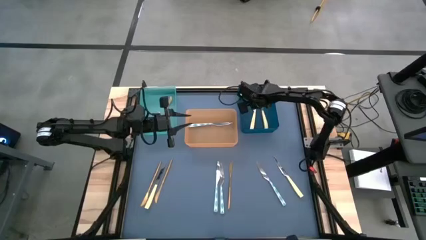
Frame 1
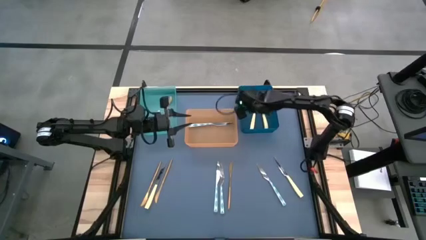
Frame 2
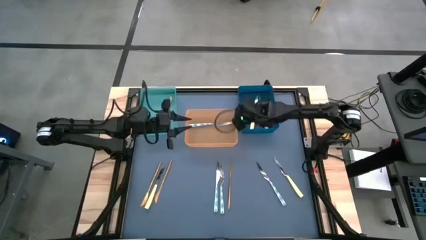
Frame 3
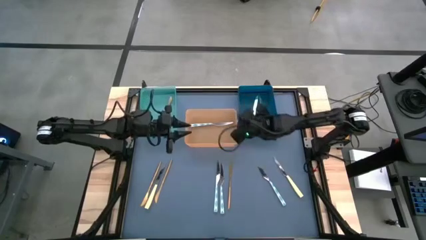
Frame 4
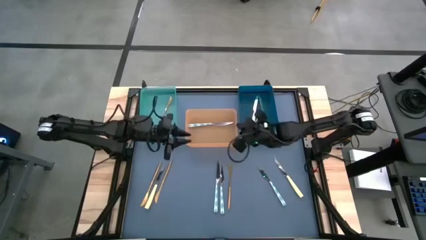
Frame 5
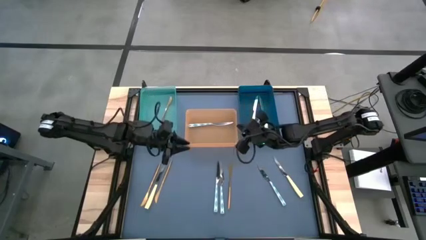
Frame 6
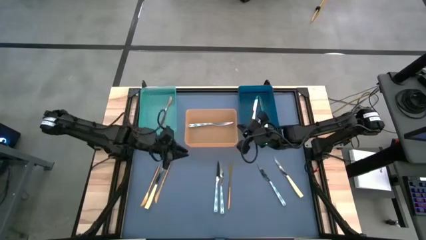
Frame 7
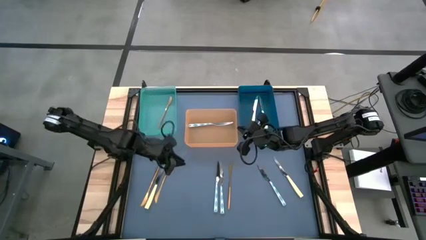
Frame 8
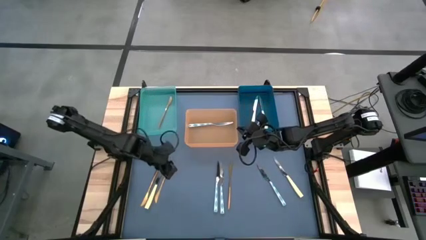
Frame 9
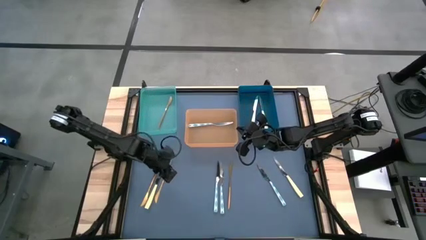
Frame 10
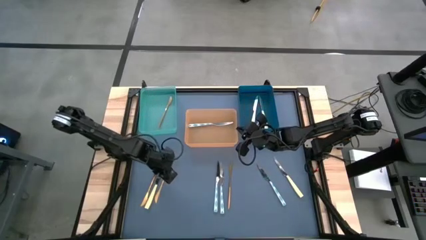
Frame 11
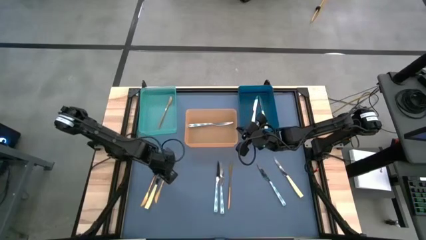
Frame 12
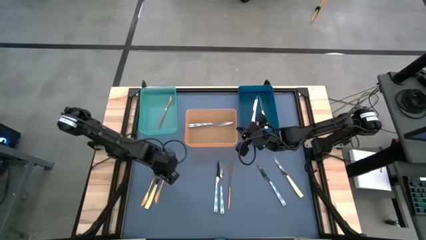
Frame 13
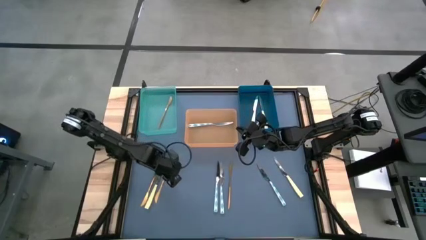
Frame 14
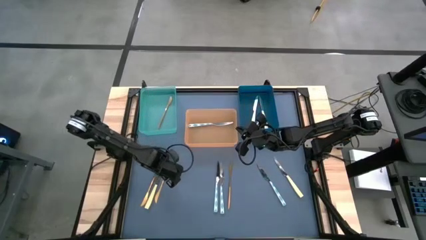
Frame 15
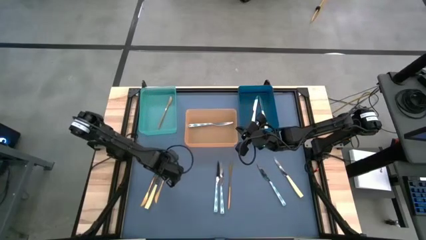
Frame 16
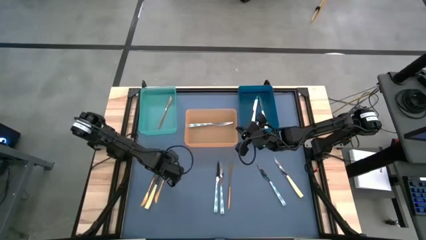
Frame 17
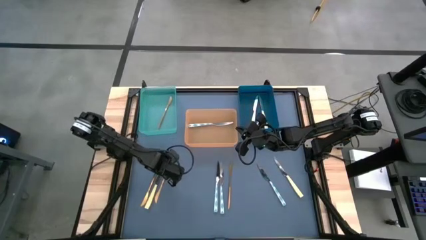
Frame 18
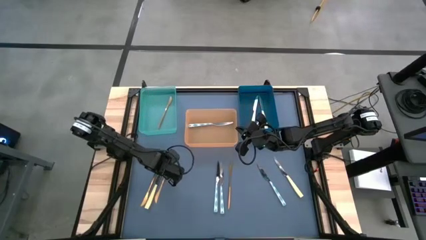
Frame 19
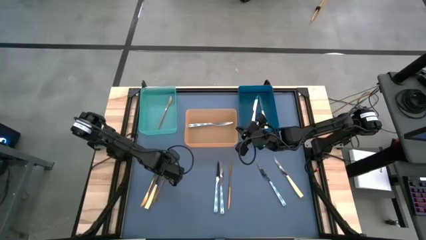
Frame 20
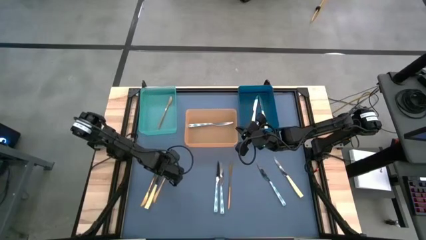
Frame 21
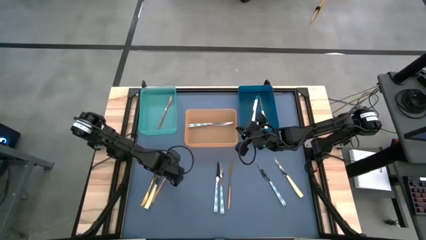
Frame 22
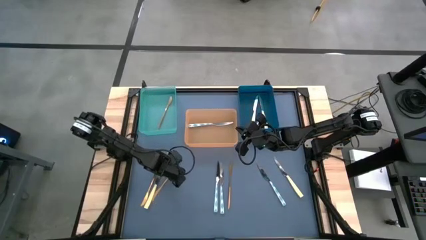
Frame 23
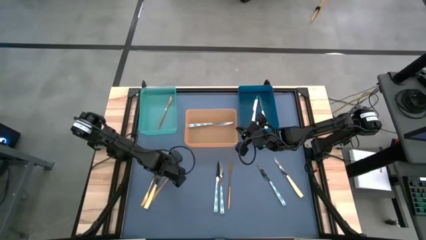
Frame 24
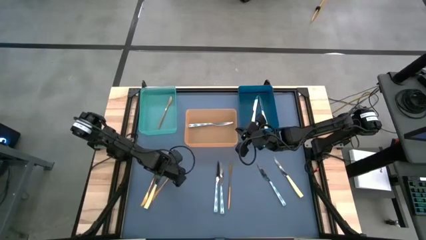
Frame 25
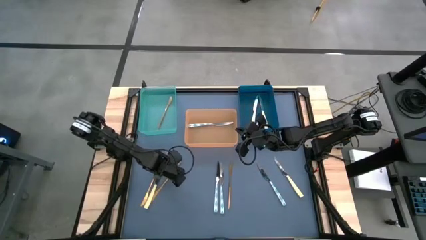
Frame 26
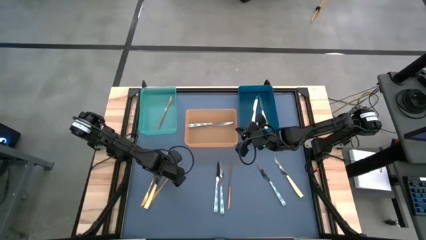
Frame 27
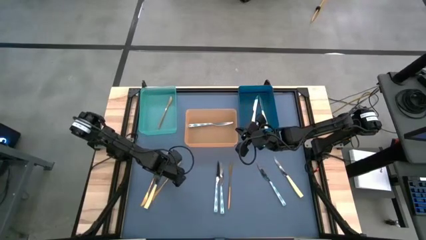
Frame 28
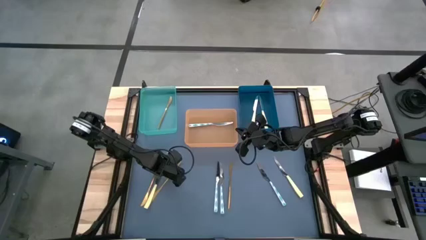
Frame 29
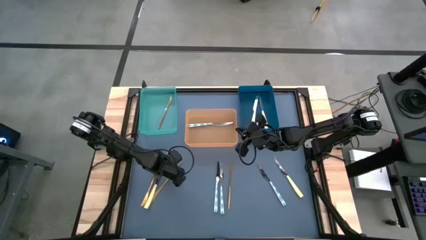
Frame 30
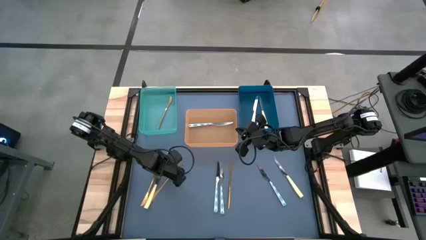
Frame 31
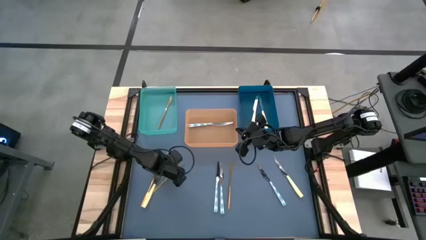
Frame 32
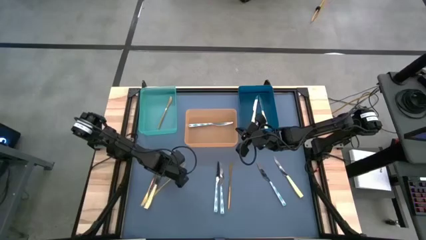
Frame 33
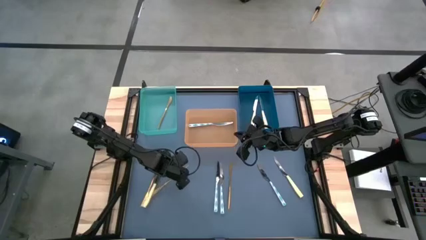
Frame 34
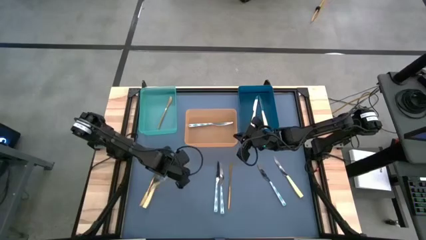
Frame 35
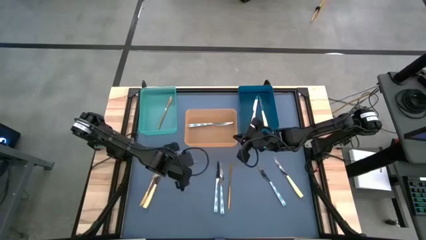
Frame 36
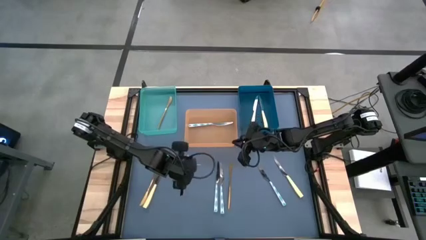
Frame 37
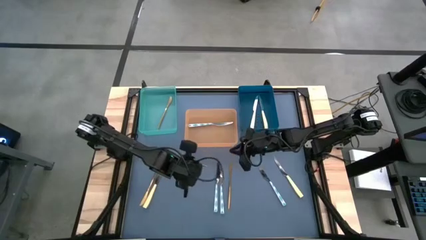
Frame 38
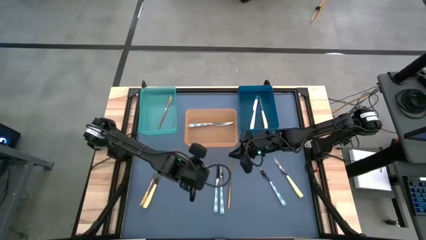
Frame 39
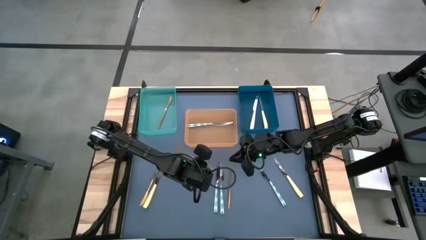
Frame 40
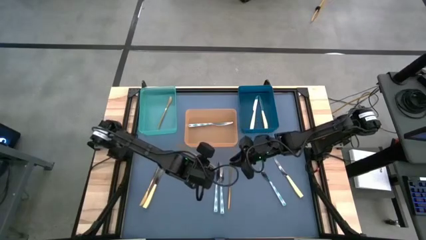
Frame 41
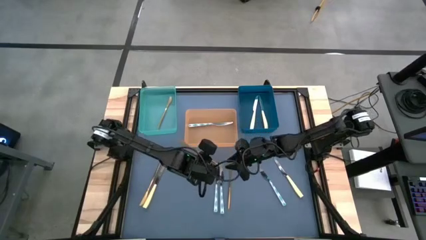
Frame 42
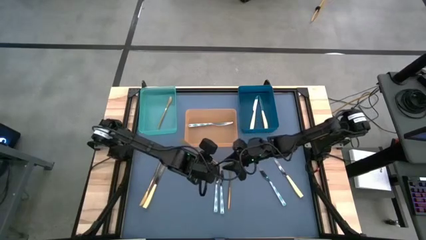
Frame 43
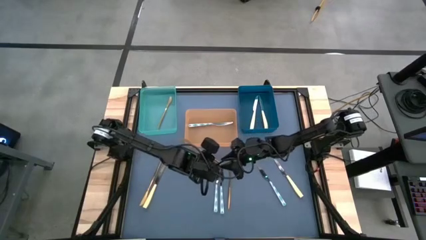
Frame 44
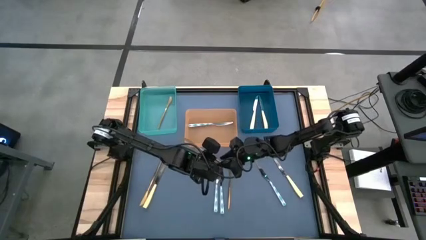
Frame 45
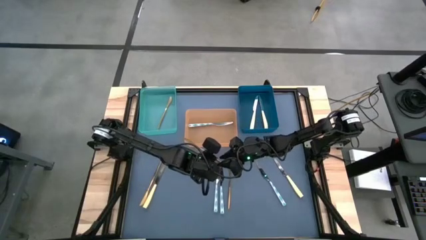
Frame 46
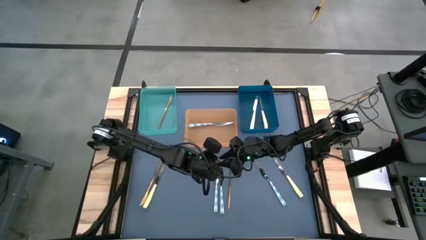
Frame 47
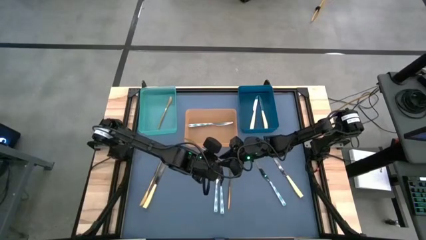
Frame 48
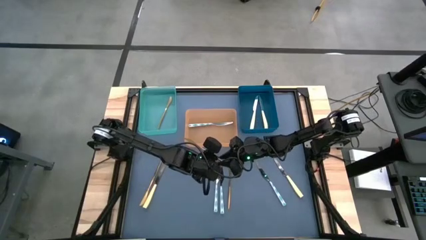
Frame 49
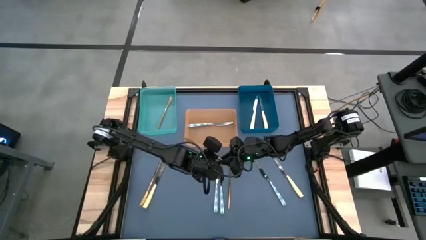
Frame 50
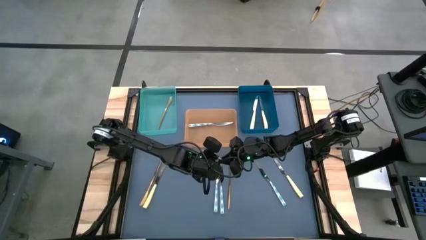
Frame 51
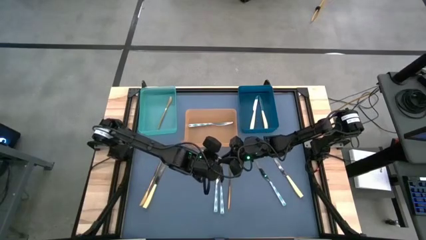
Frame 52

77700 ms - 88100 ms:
Task: Sort silverware by color (type)
Put the gold knife into the green bin

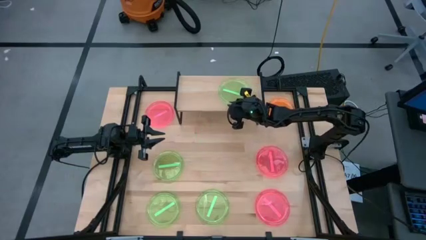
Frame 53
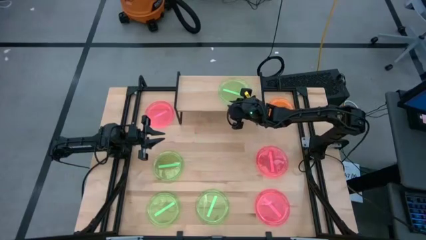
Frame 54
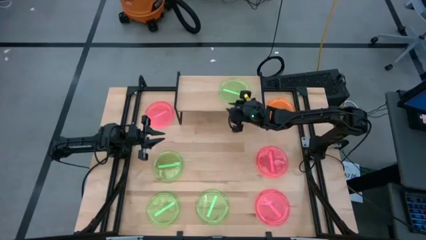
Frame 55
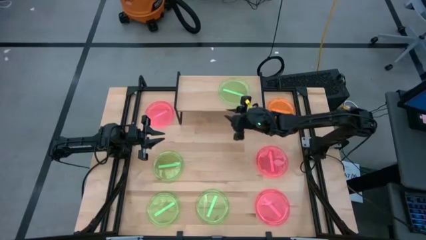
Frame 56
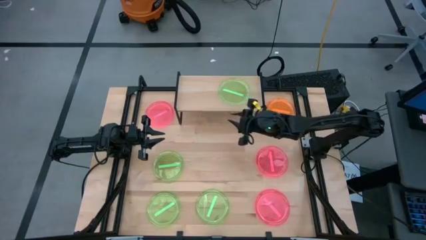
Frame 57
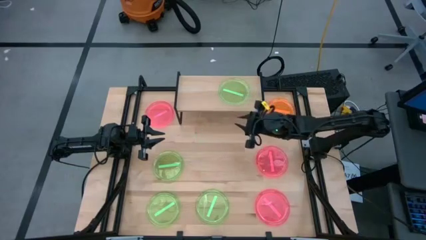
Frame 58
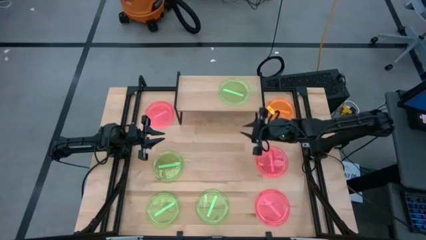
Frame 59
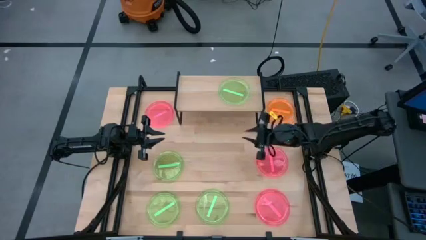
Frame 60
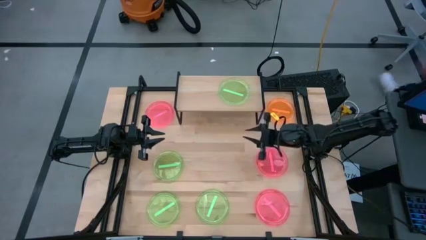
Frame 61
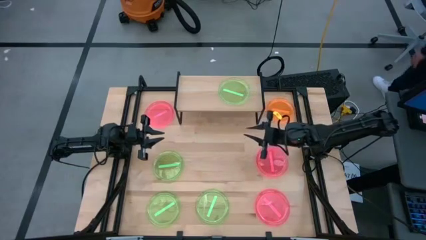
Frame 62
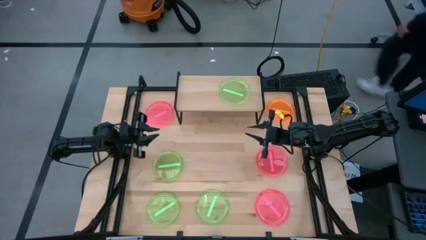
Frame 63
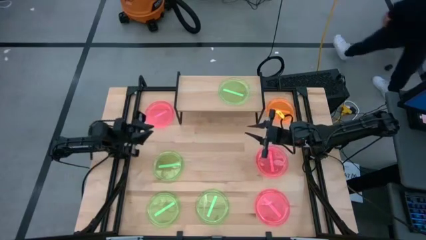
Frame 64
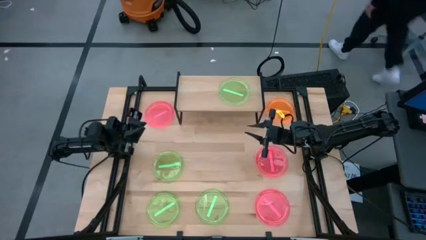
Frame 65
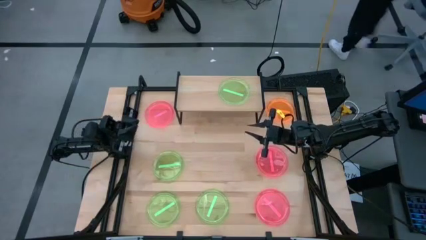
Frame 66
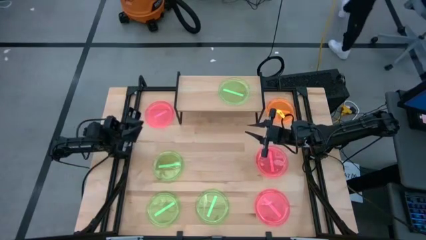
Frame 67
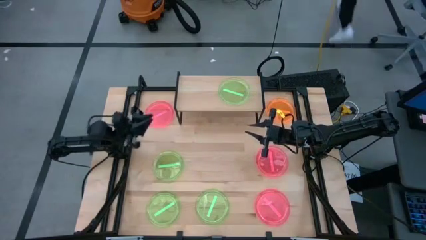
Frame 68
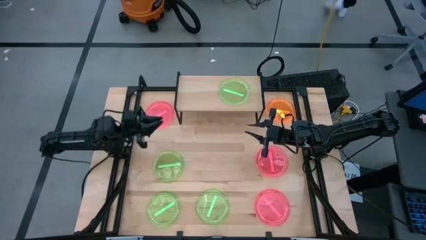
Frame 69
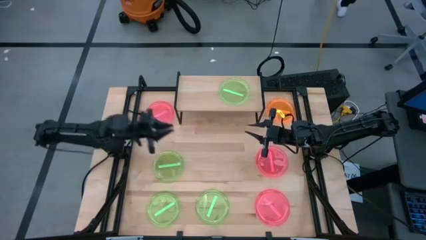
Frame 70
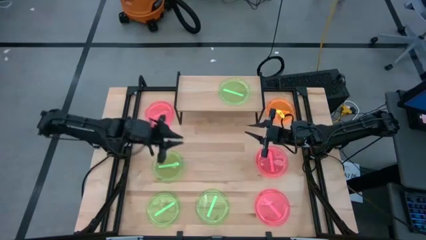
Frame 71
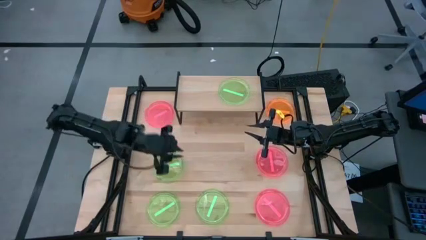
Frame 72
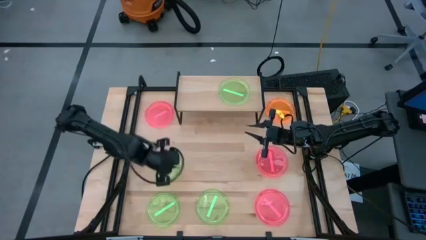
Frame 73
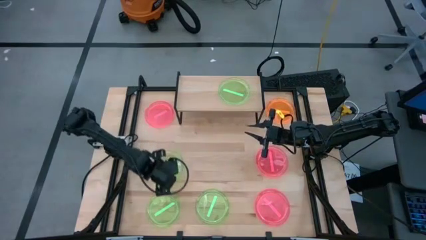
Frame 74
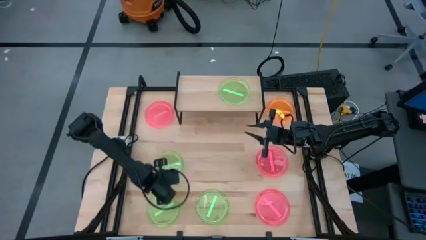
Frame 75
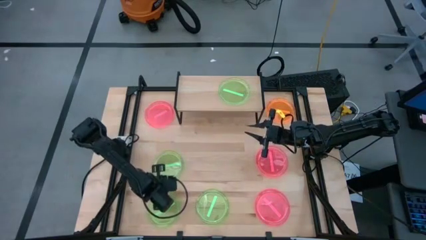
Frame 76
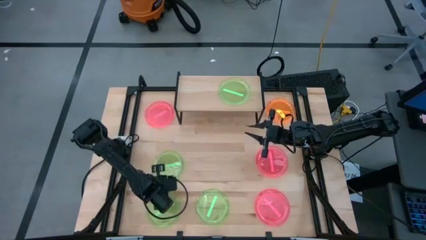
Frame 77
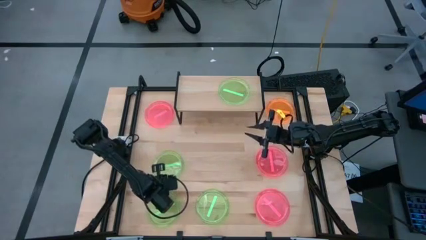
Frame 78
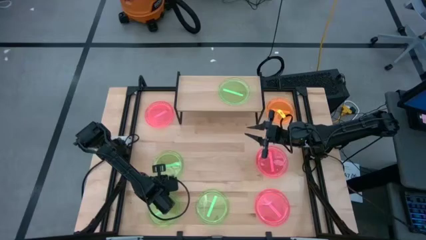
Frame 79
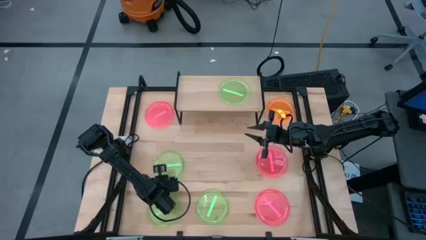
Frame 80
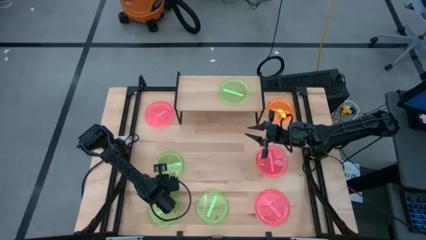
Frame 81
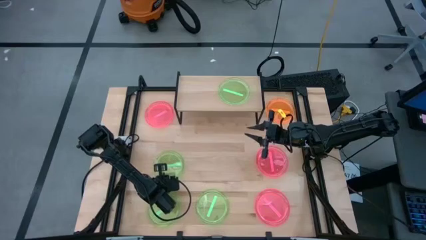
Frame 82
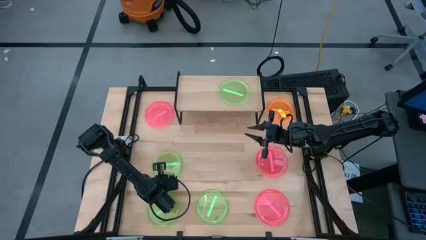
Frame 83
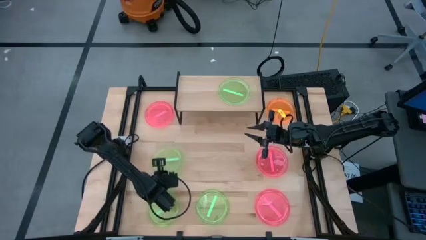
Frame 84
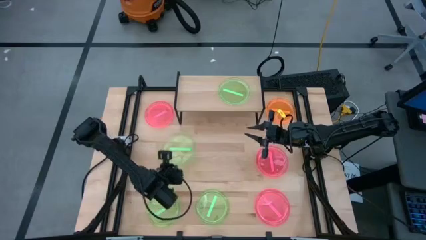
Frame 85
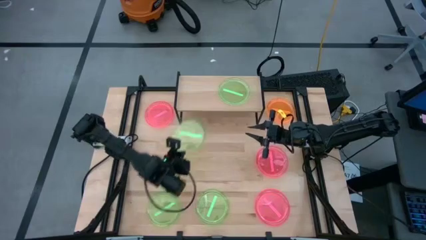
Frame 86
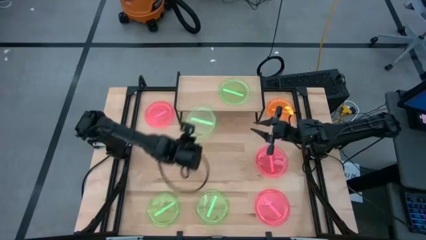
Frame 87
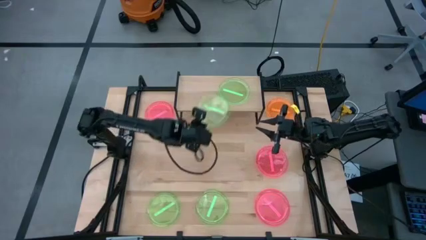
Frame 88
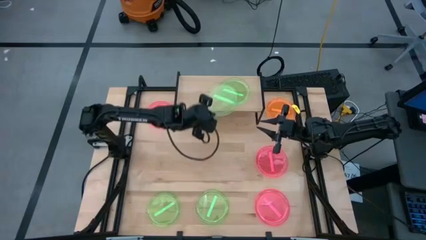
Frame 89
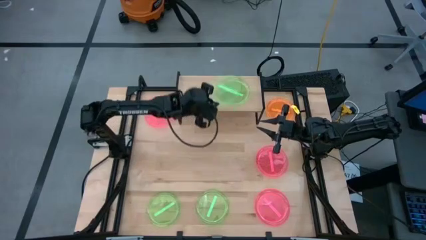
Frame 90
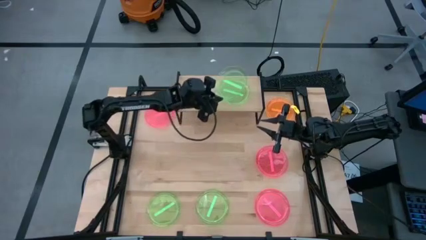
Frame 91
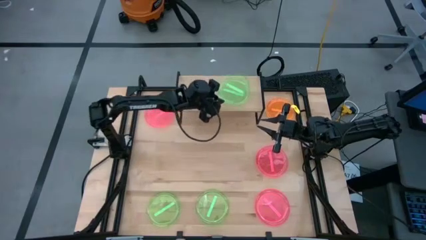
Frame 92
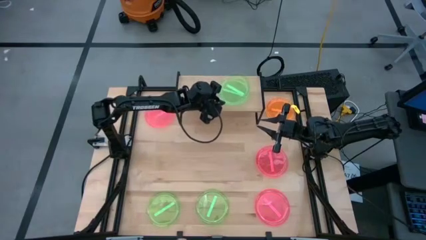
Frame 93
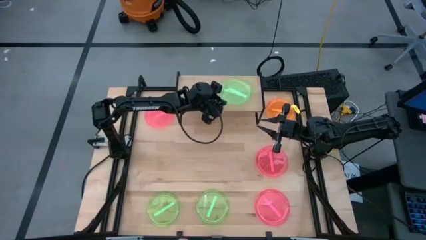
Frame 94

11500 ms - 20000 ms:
Task: Place and stack plates onto a shelf
Stack the green plate on top of the green plate on the shelf
